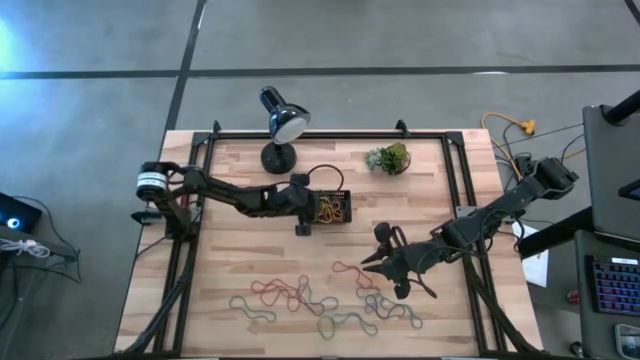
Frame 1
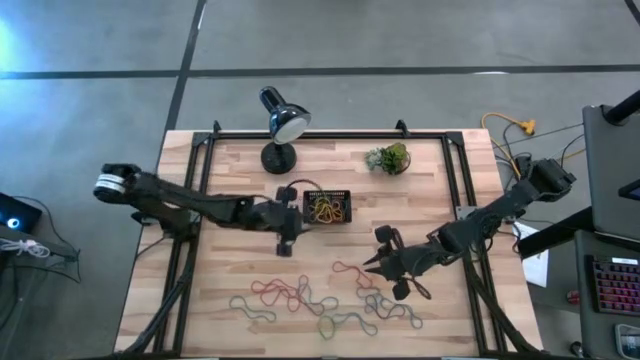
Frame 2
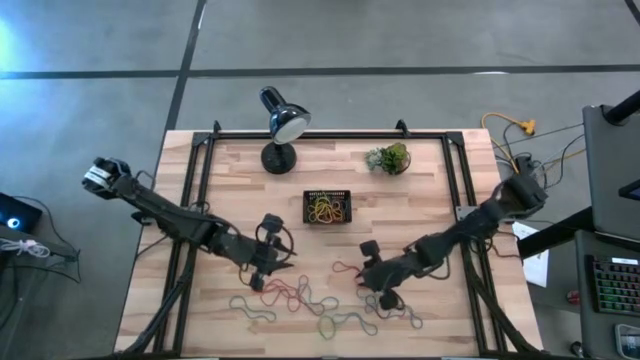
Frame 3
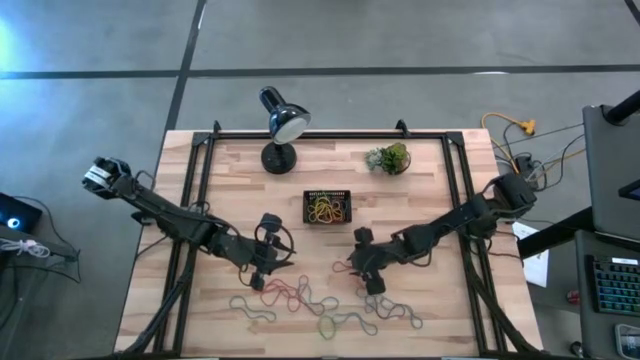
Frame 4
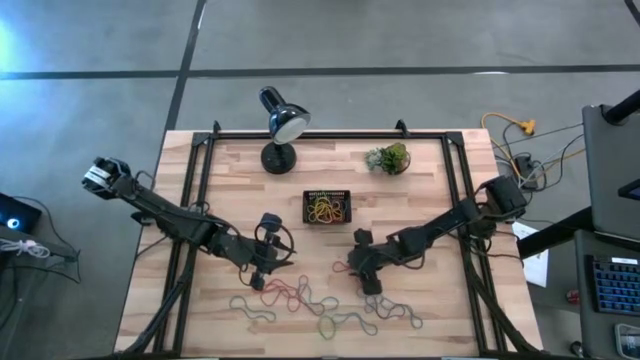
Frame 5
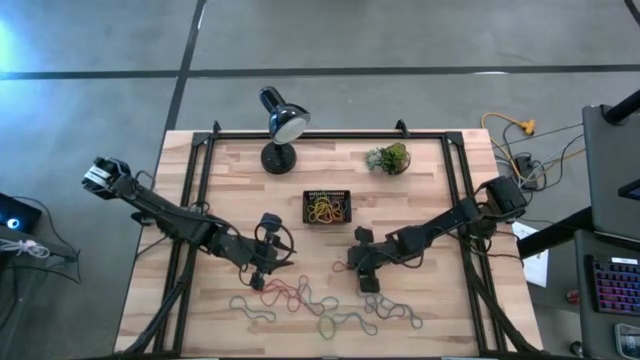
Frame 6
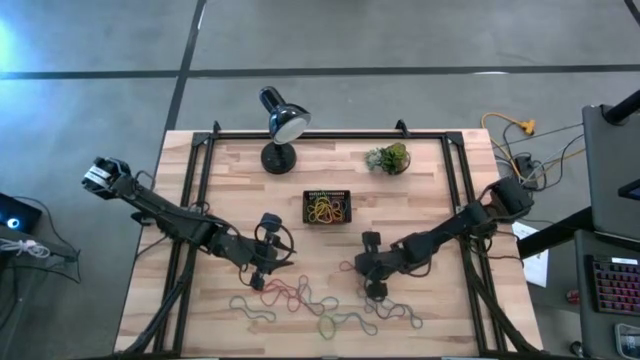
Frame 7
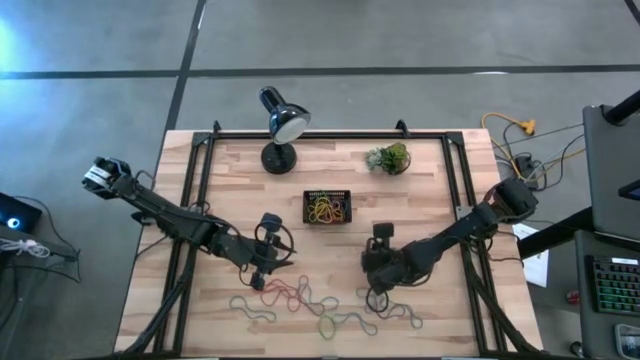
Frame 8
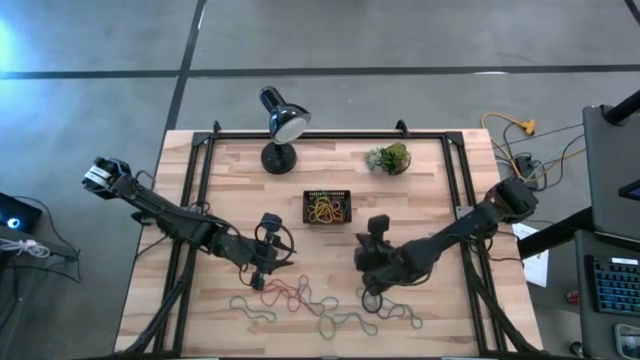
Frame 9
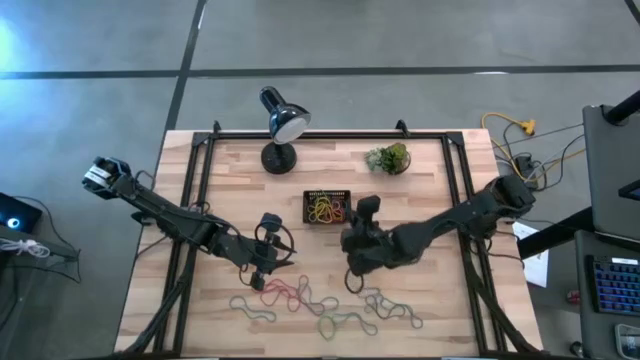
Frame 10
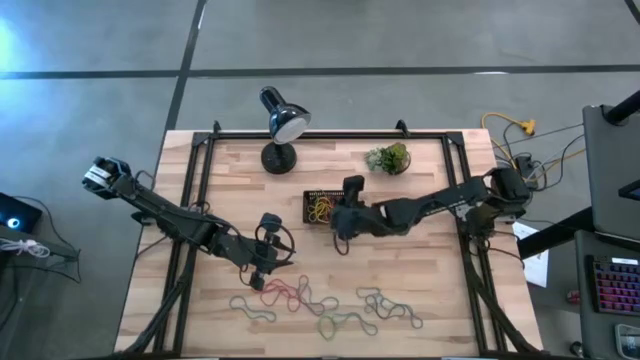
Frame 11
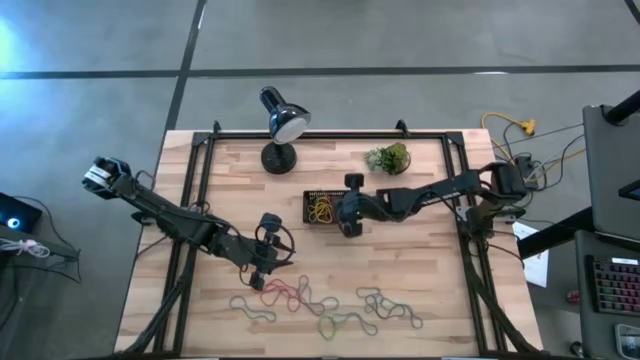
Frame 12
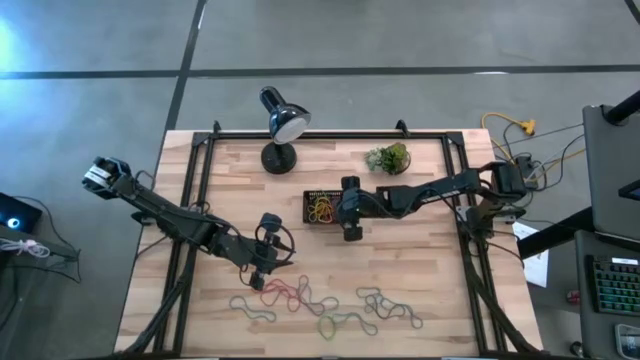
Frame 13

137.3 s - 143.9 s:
Task: Pick and place rubber bands into bin
Put the red rubber band into the black bin

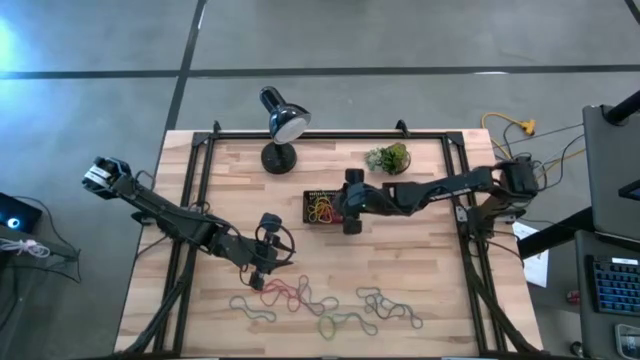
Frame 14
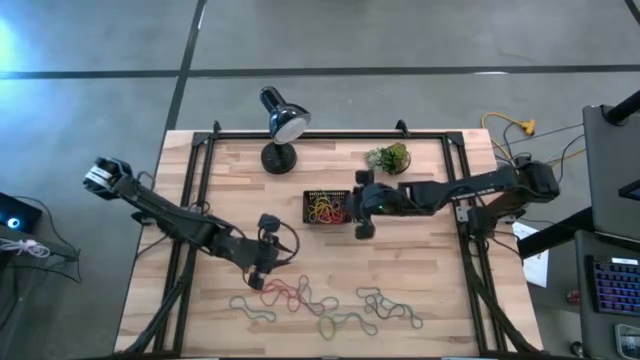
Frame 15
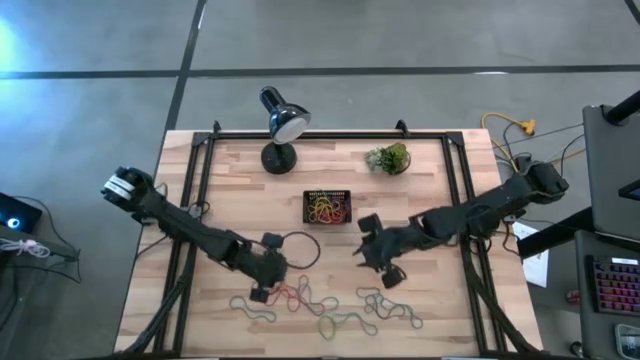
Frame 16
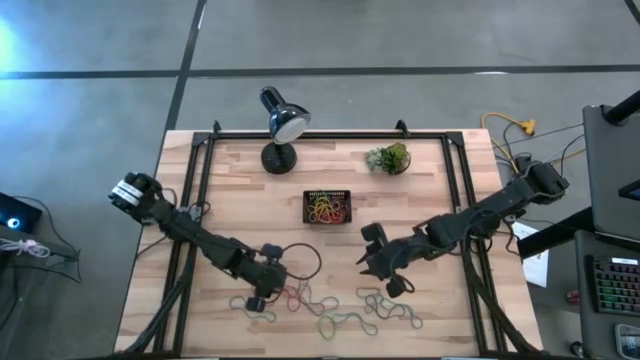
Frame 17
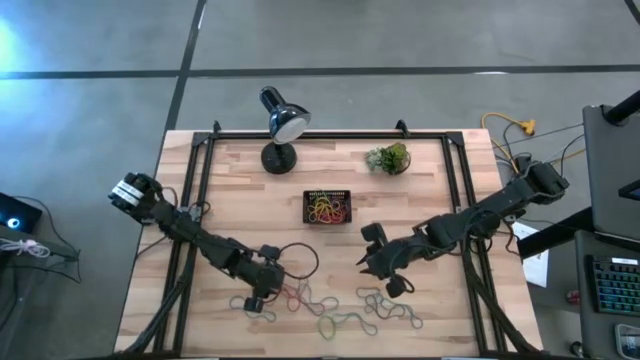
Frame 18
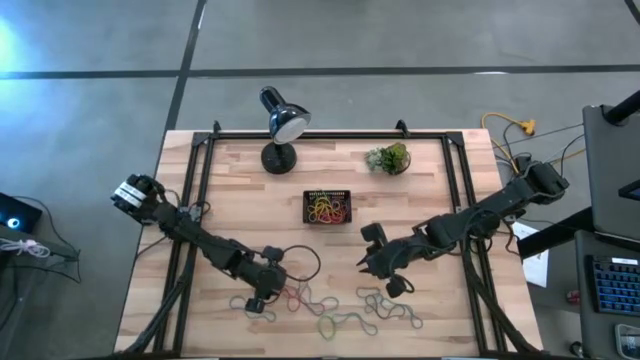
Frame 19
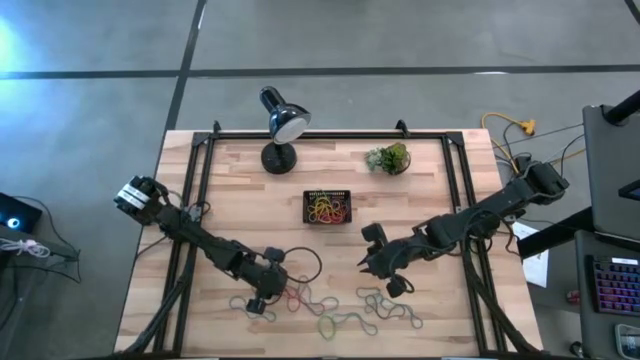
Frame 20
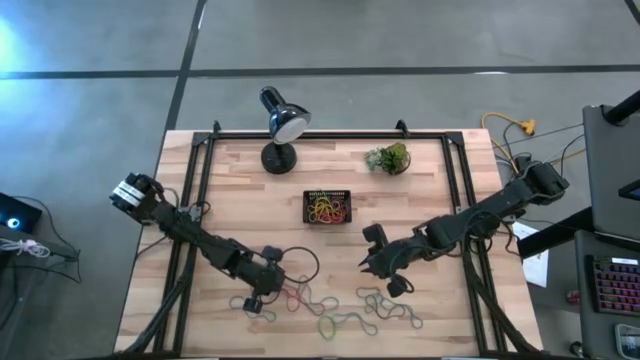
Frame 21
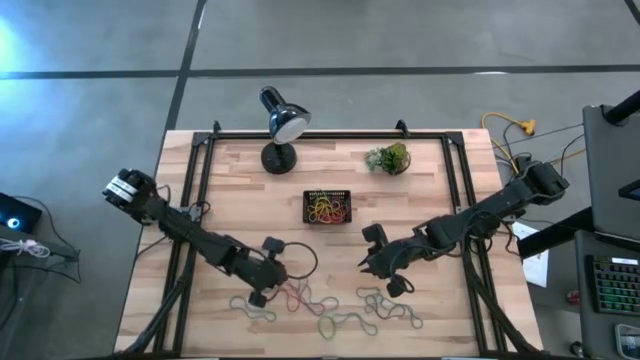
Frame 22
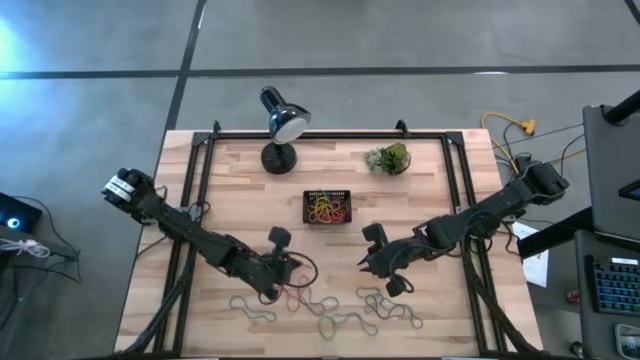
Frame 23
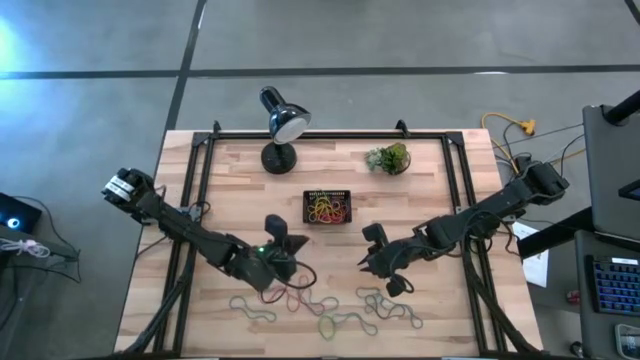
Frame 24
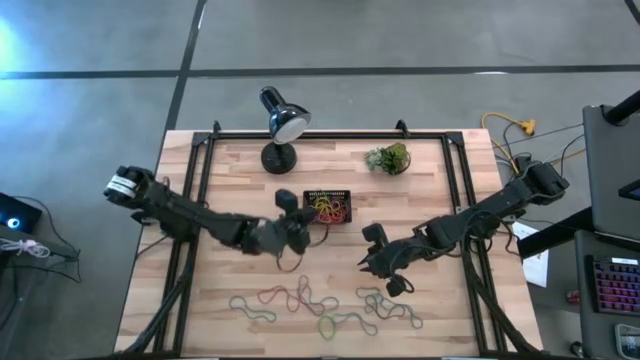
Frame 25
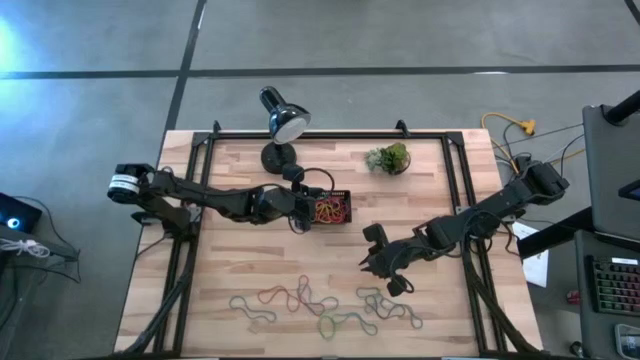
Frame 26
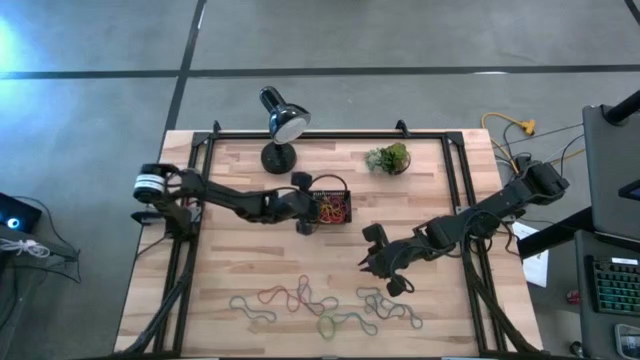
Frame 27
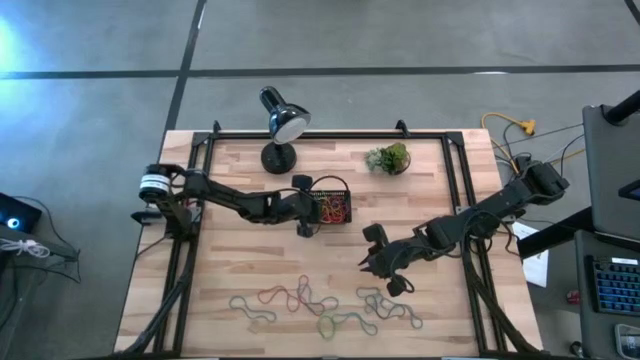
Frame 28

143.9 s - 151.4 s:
Put the red rubber band into the black bin

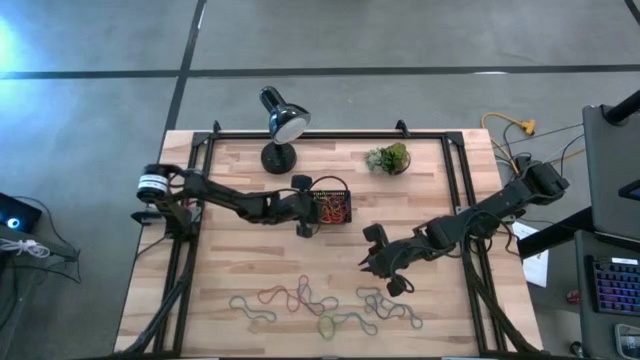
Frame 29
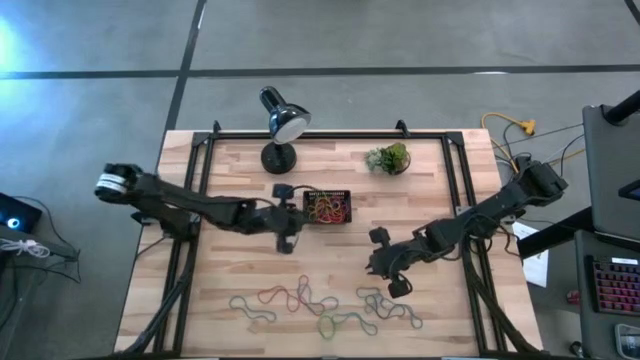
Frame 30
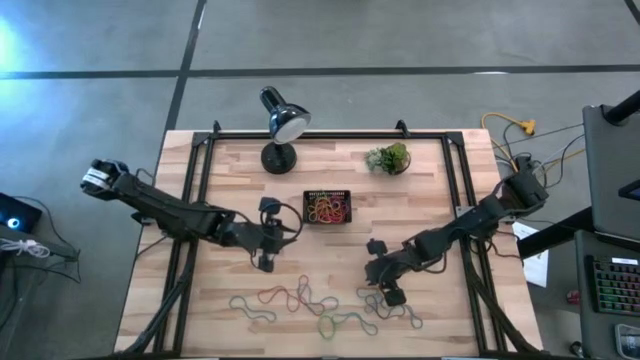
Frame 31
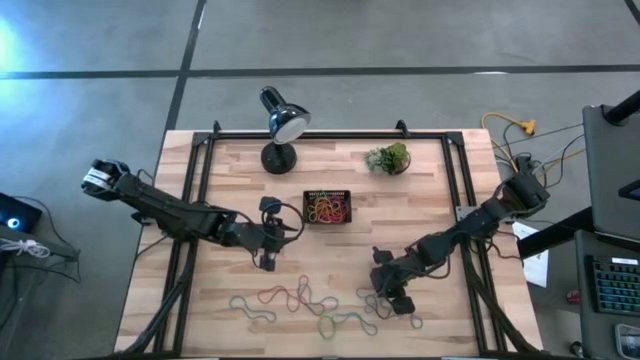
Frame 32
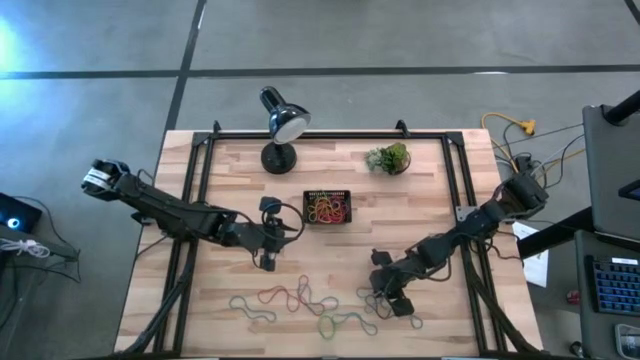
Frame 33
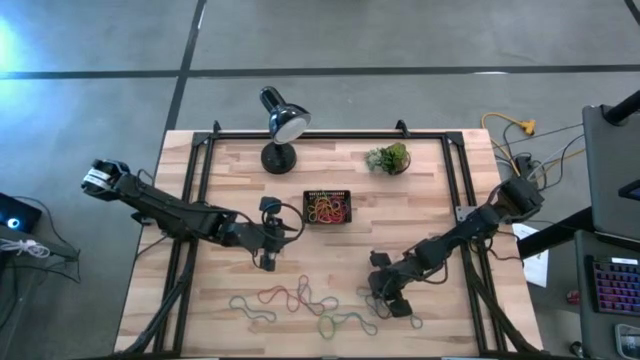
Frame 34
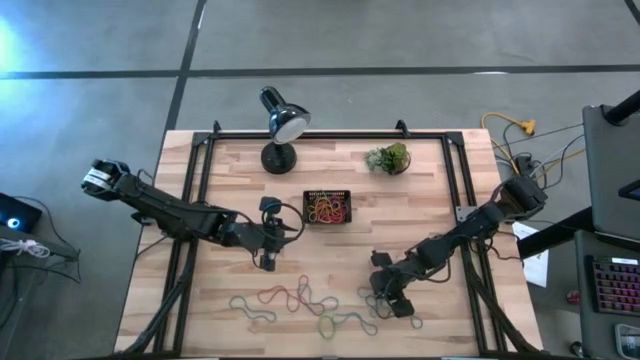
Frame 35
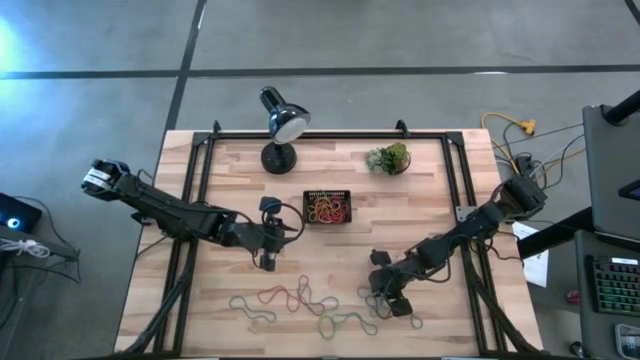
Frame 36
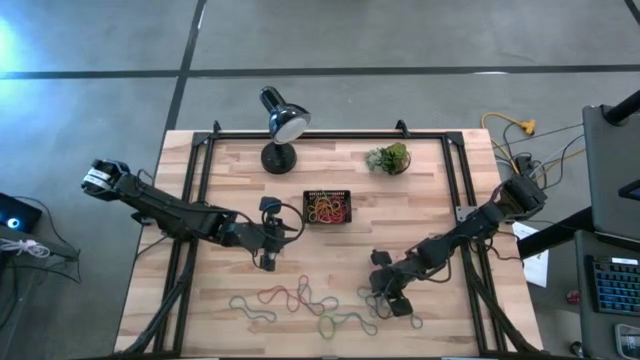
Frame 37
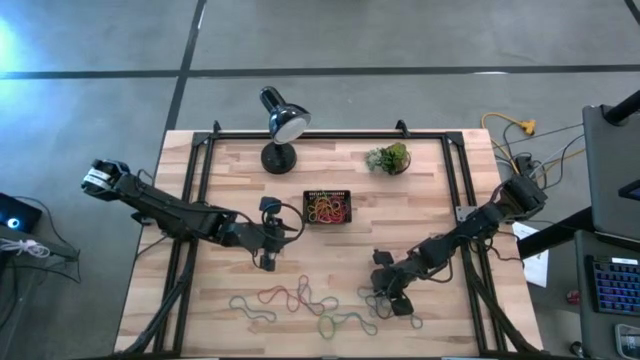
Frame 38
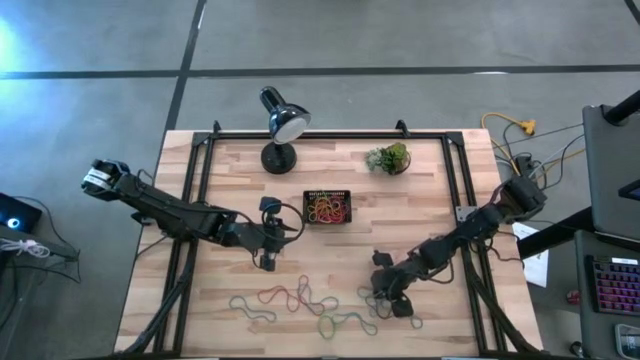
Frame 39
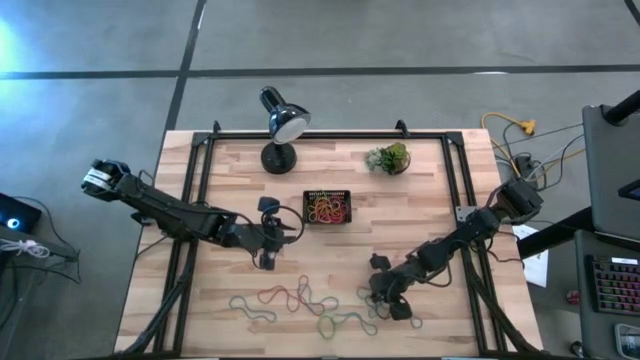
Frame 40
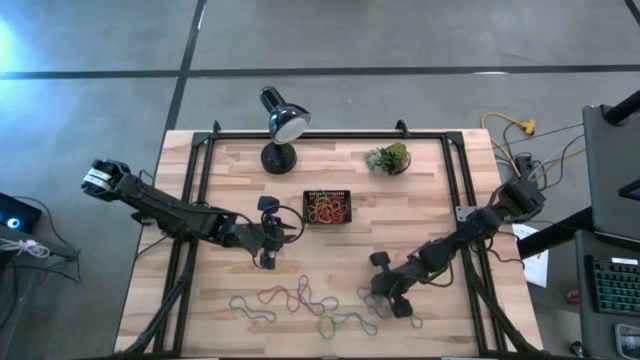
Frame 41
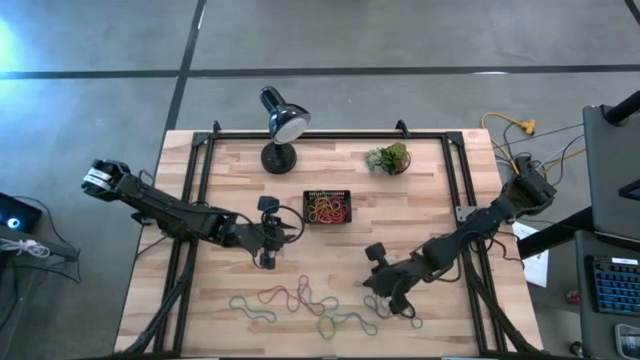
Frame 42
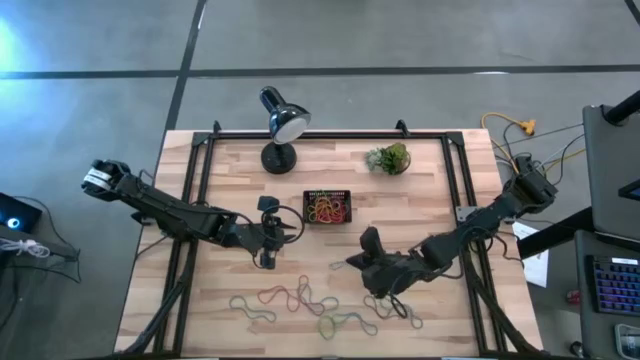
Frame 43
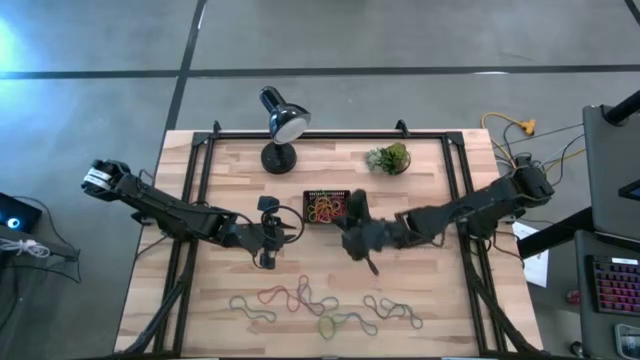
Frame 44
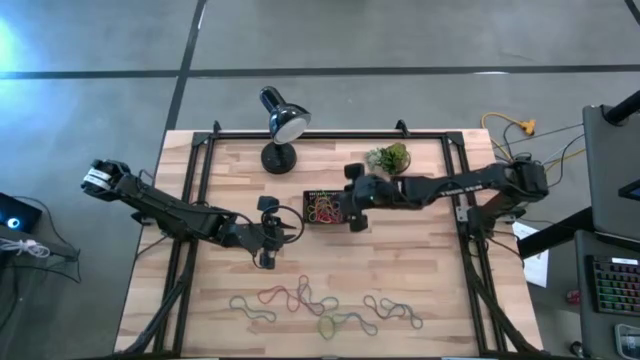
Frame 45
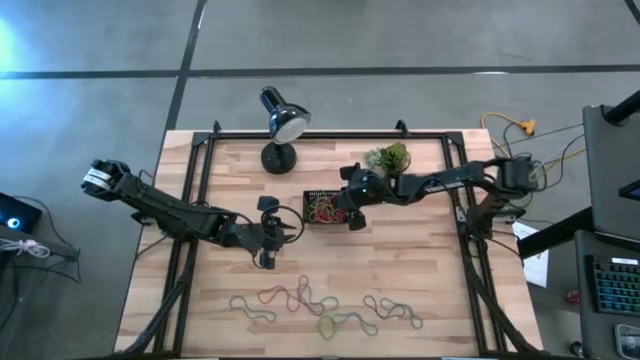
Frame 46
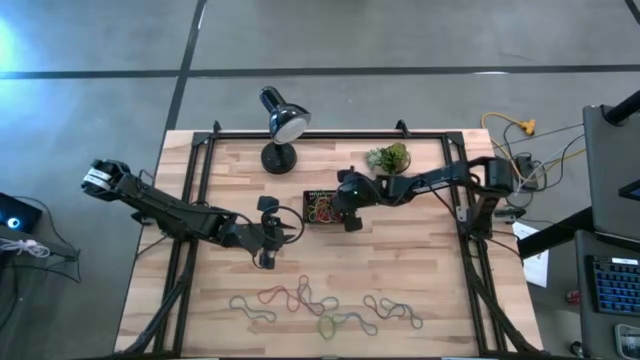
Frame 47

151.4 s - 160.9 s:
Put the blue rubber band into the black bin
